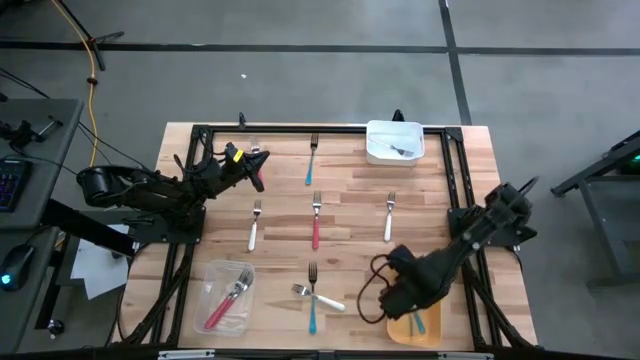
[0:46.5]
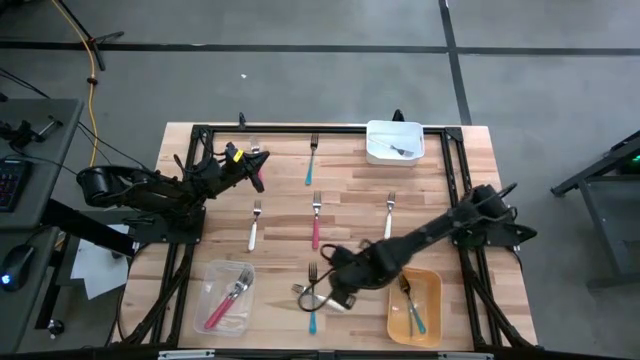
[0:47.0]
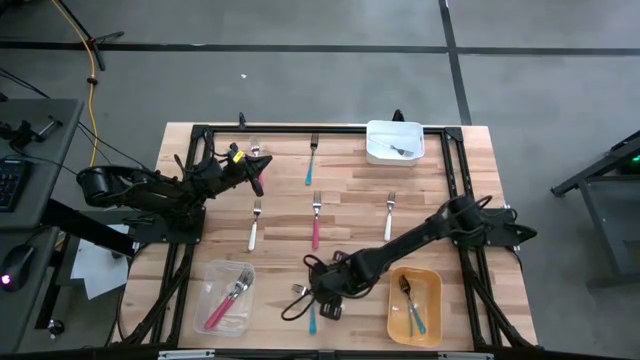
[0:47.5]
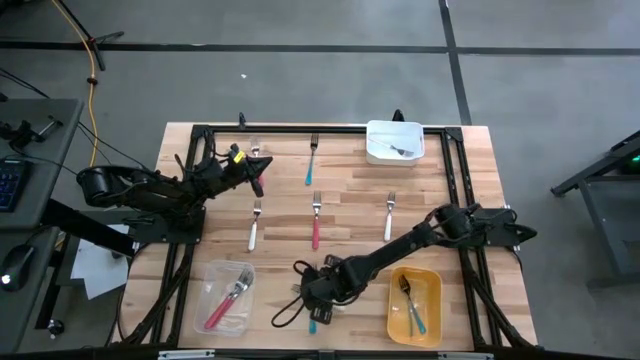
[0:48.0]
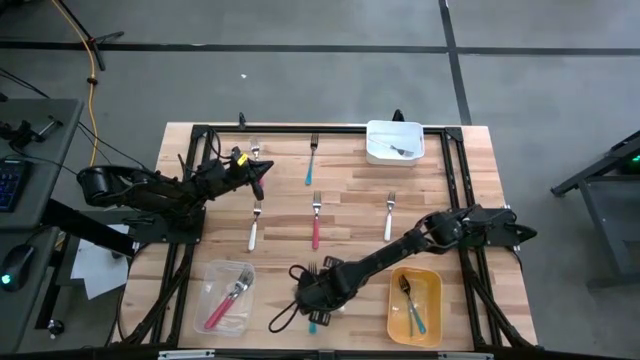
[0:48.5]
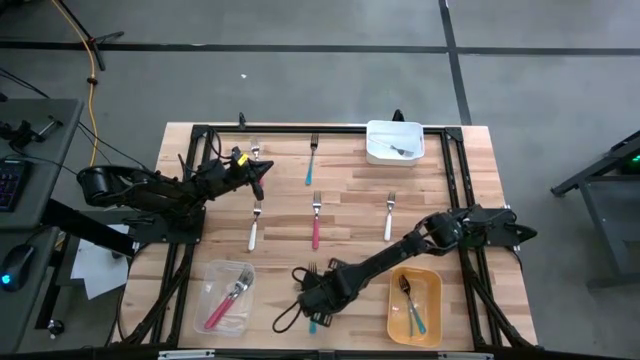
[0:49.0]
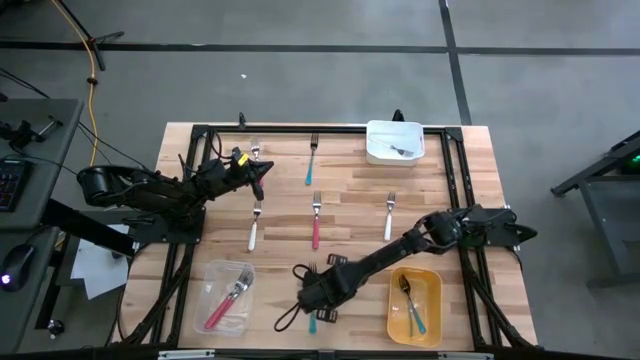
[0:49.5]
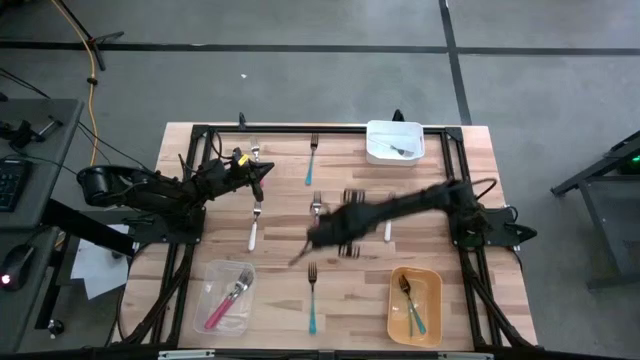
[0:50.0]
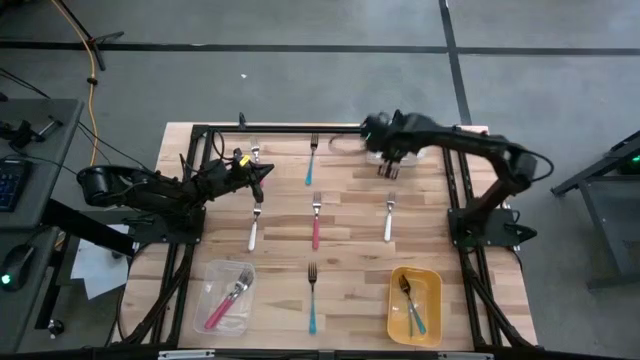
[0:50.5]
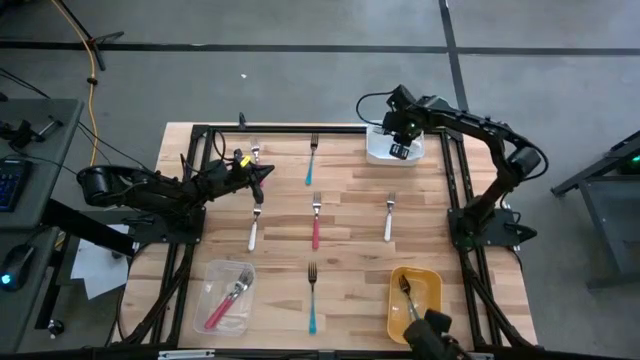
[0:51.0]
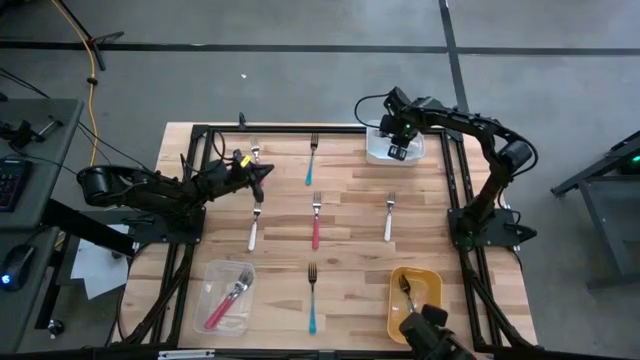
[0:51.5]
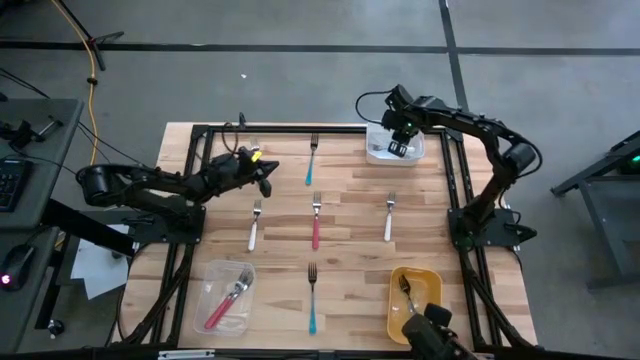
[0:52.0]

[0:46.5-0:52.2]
Task: Sort silverware by color (type)
Put the bottom white fork into the white bin

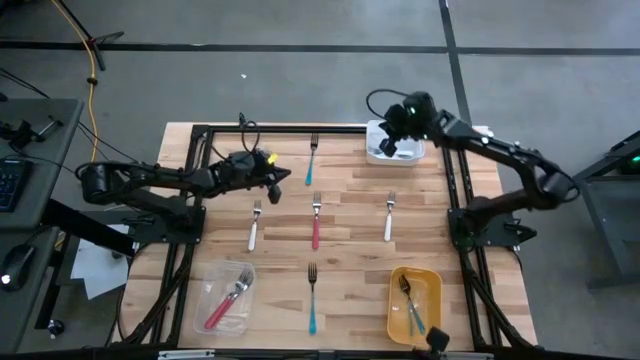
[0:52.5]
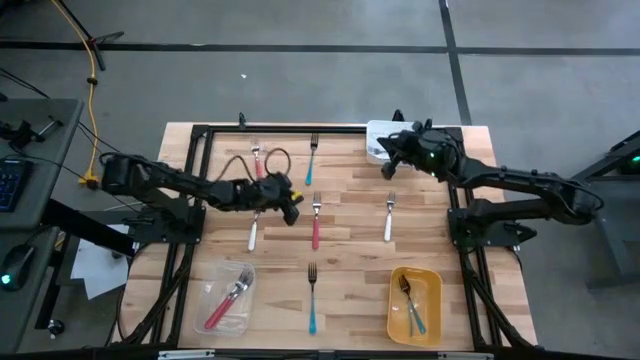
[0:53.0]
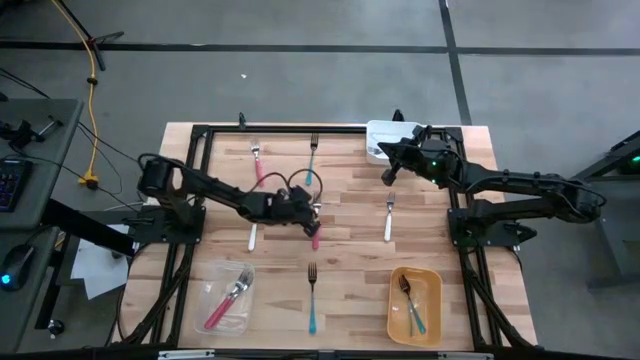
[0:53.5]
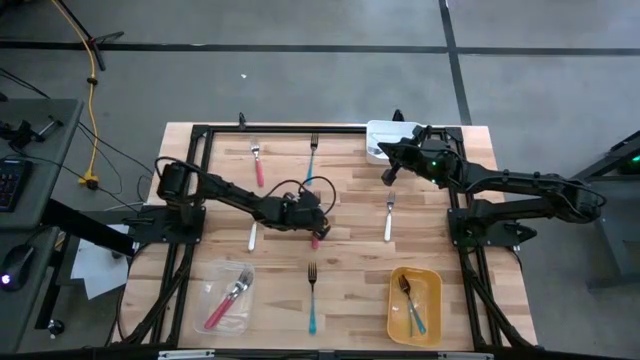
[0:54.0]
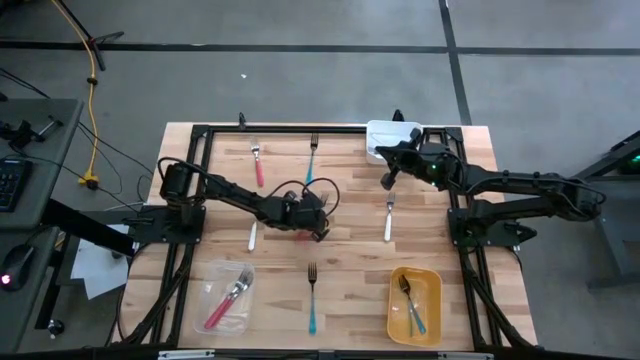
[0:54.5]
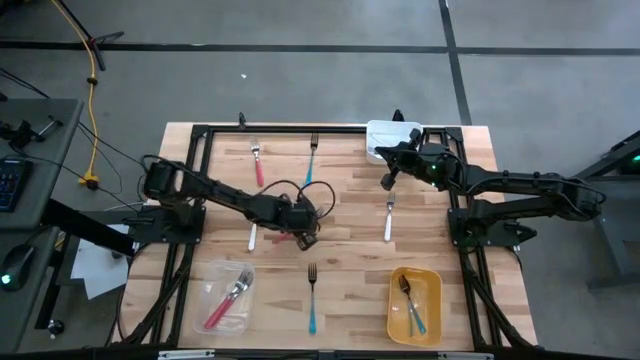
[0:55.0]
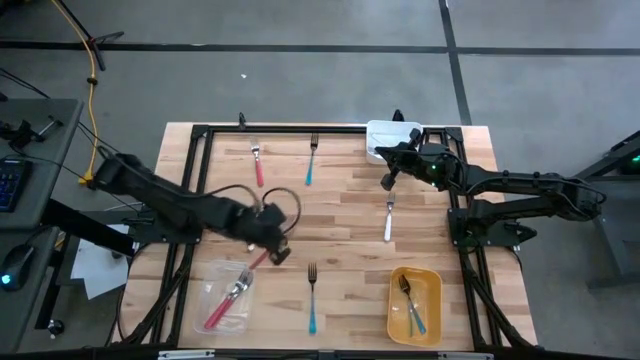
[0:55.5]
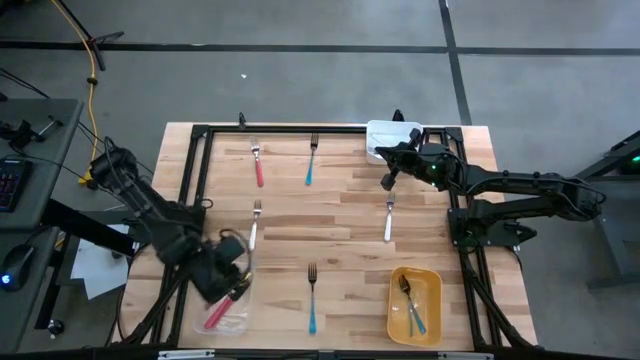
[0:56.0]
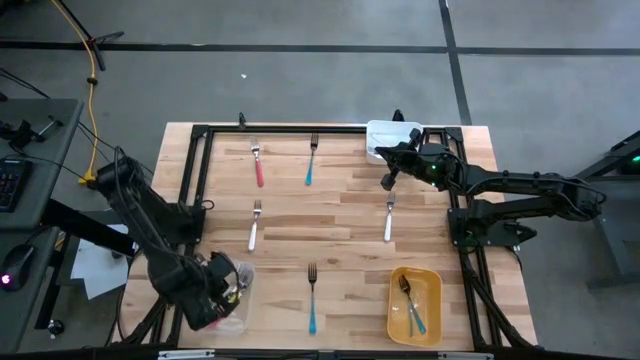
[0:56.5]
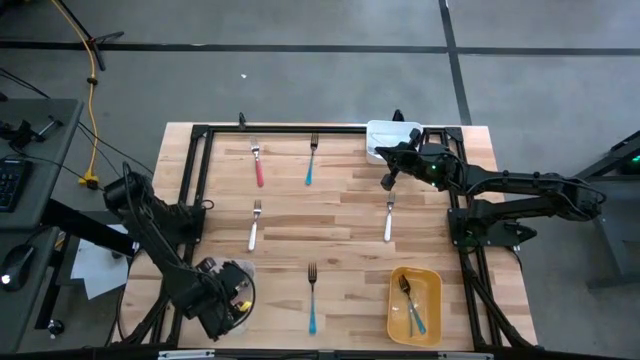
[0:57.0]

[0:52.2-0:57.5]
Put the center pink fork into the transparent bin

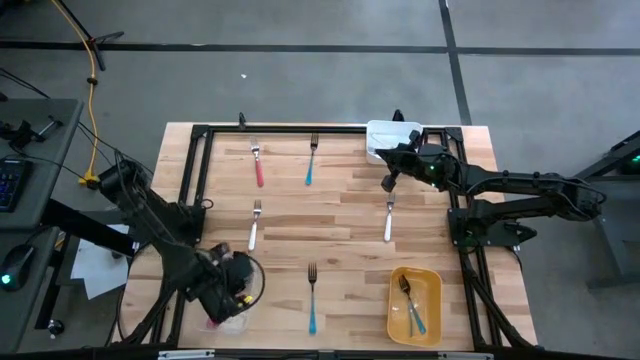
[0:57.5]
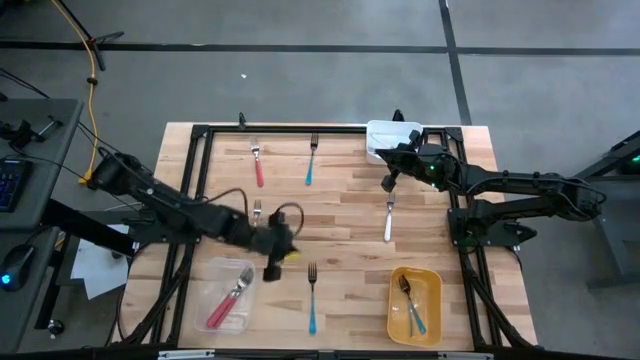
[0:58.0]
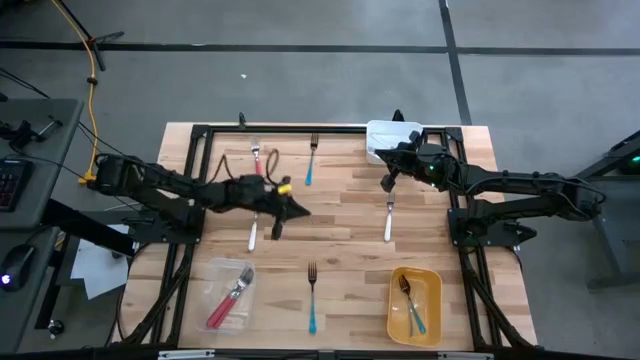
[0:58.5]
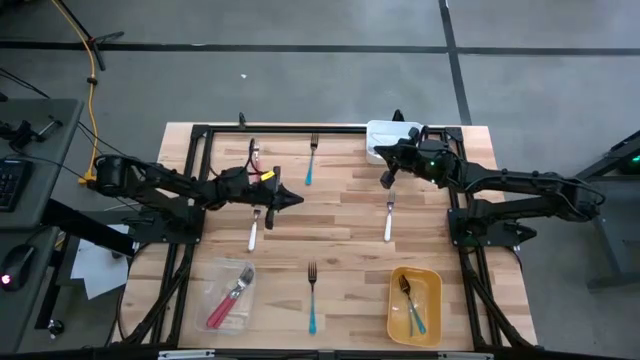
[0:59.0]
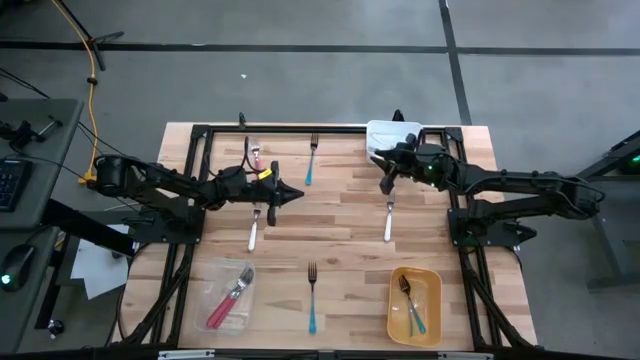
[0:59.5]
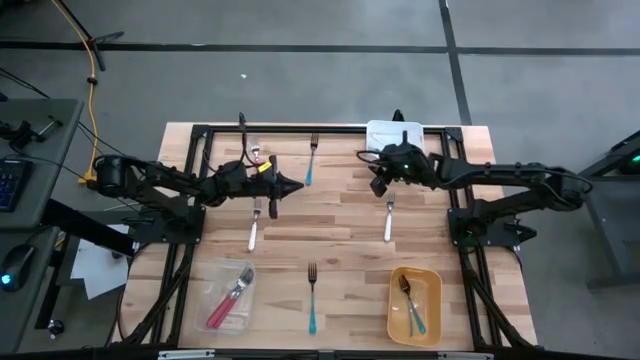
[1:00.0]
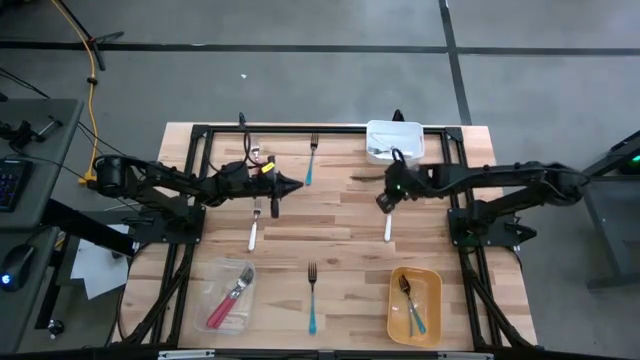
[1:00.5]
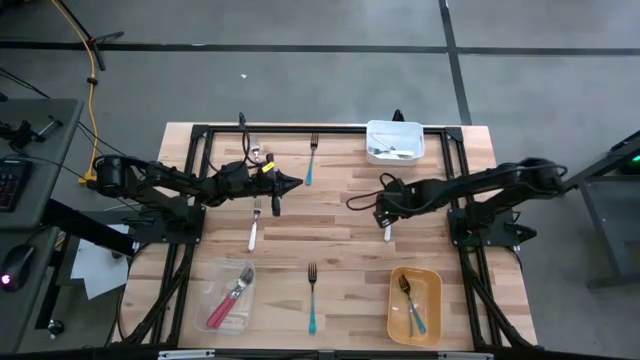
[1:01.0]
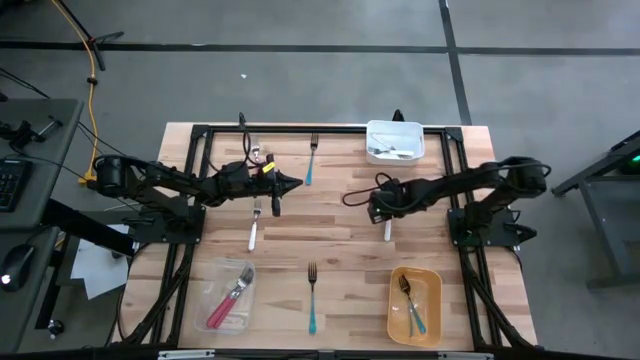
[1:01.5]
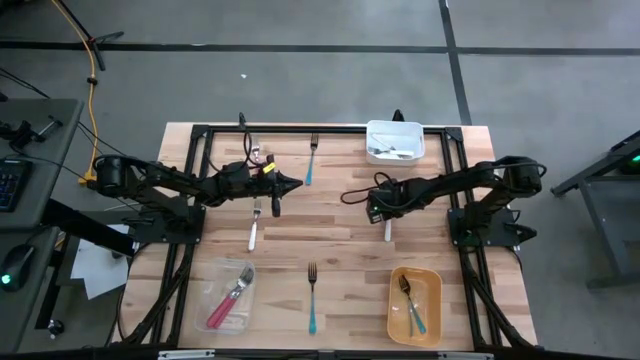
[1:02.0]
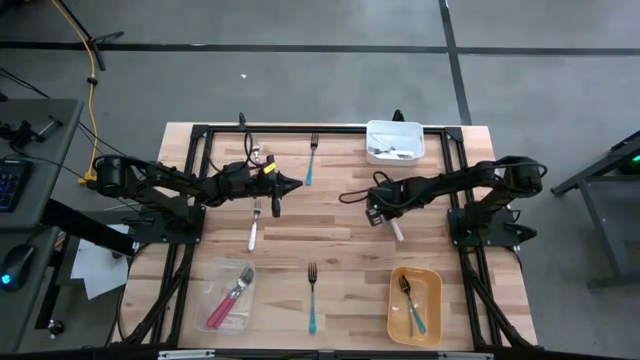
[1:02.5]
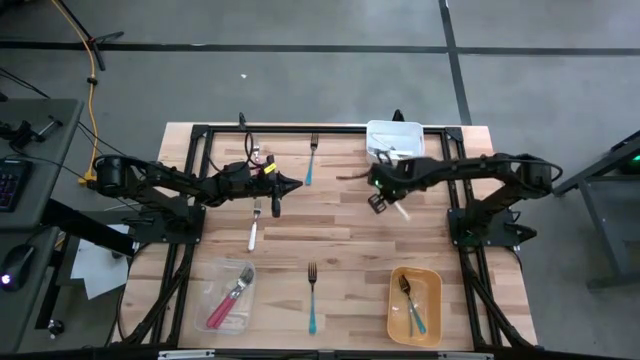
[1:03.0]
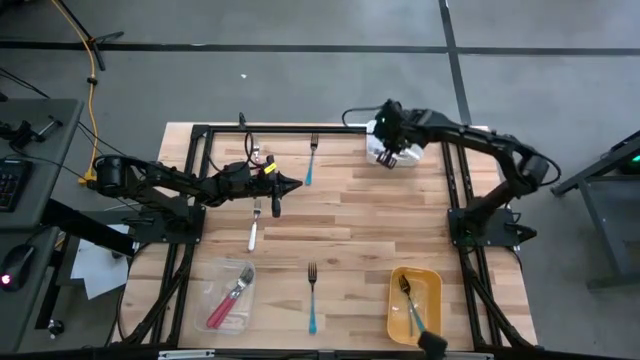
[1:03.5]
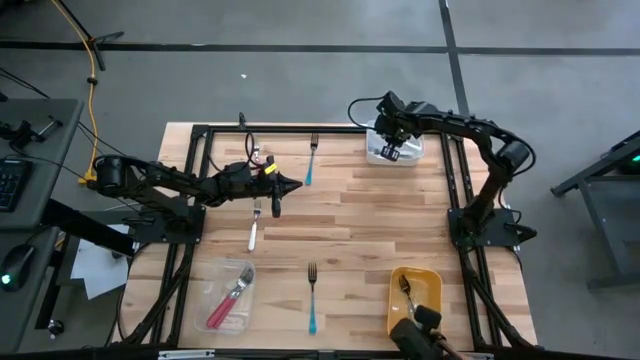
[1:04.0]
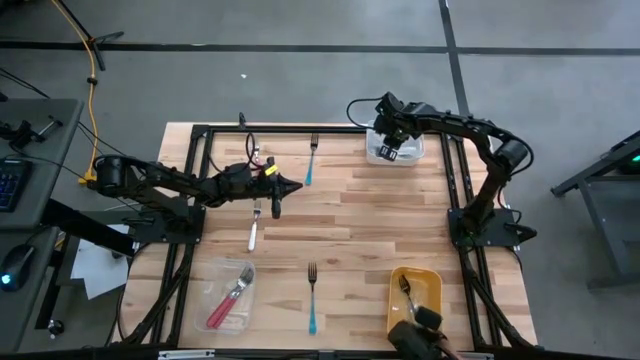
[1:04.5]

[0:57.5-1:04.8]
Put the middle right white fork into the white bin

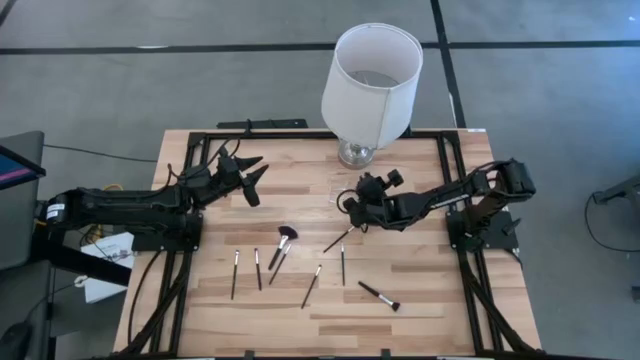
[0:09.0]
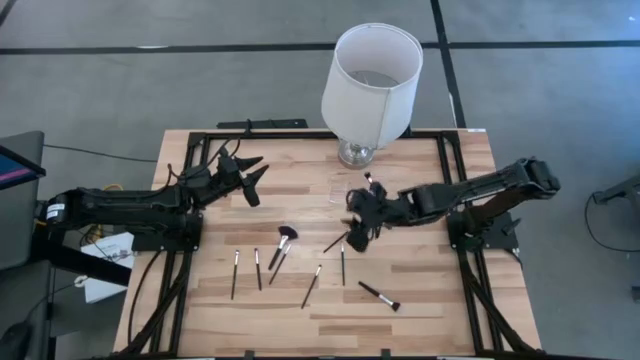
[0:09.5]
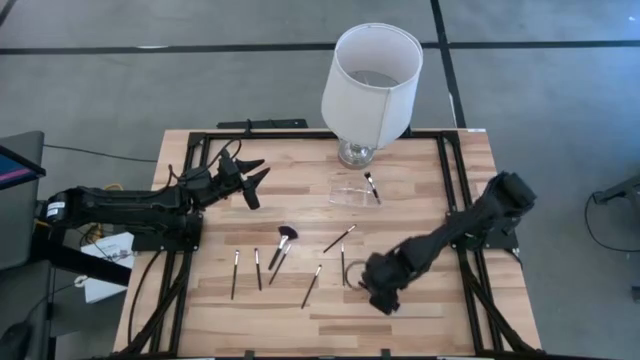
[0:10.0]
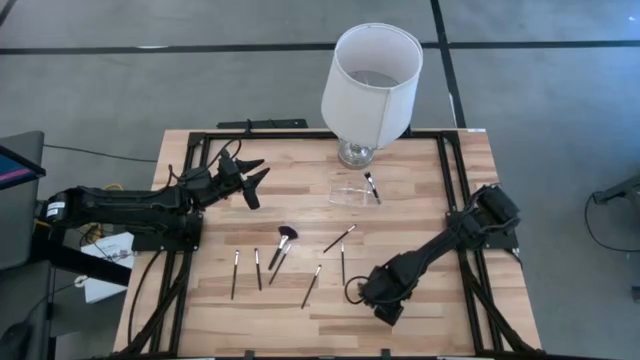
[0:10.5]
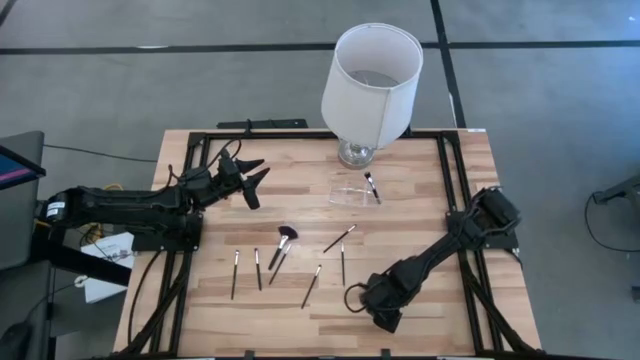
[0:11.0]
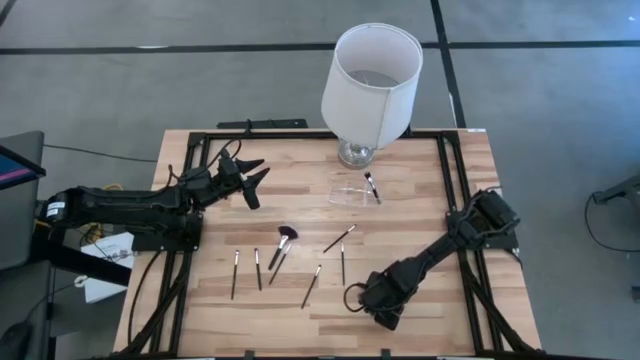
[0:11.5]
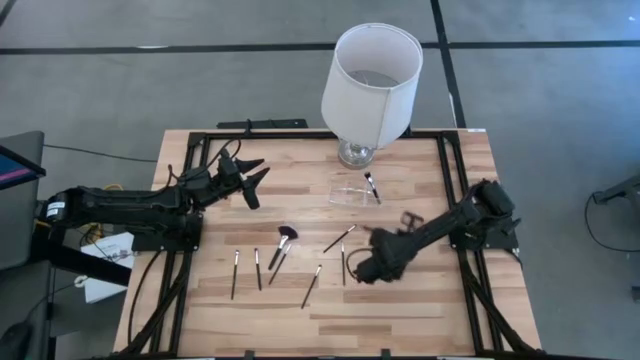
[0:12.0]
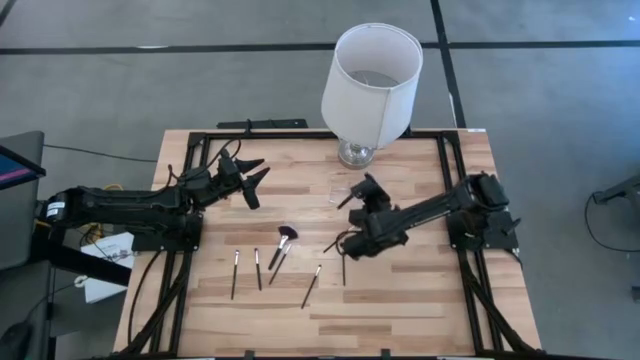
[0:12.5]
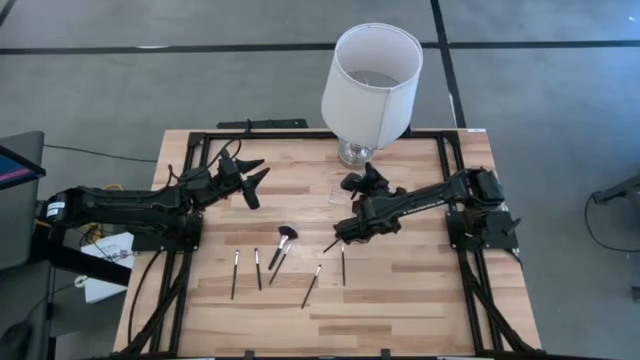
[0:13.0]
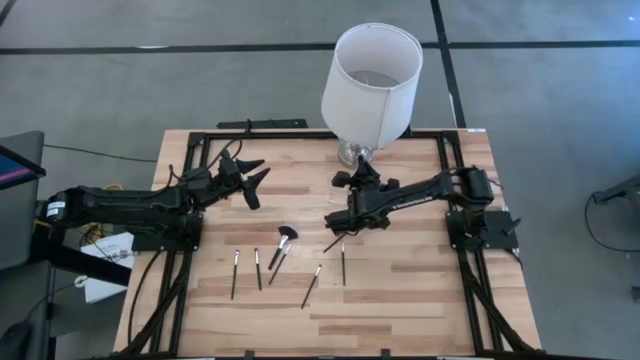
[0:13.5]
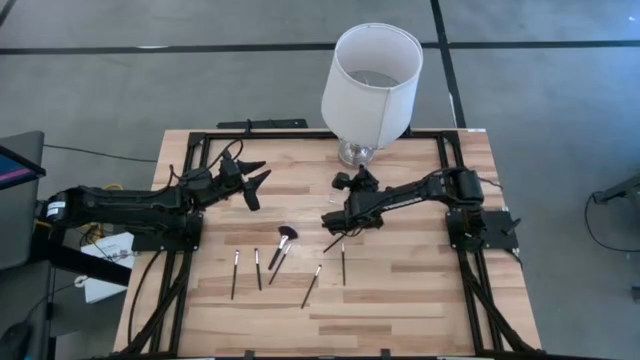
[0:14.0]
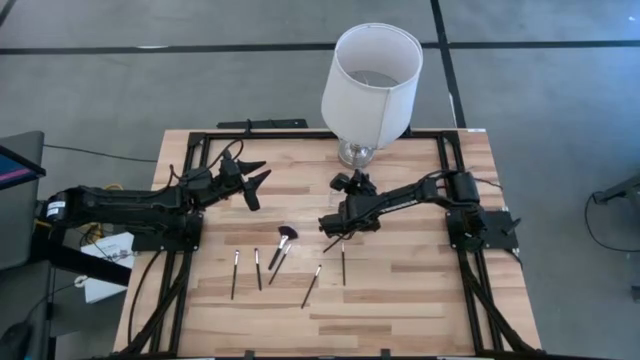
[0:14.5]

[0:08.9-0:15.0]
Task: Put items in baskets/containers
Put the powder brush into the transparent organizer
